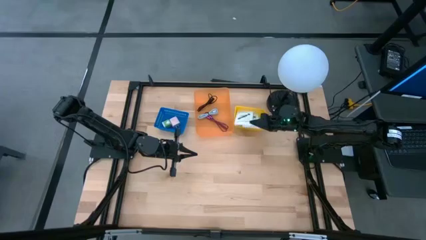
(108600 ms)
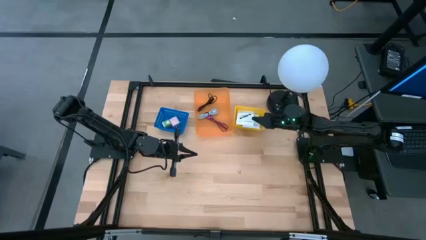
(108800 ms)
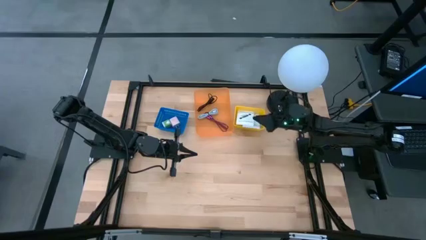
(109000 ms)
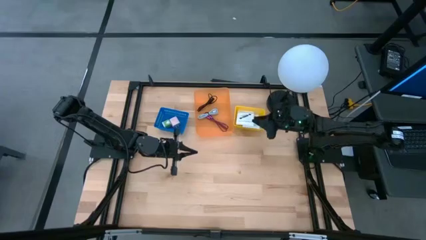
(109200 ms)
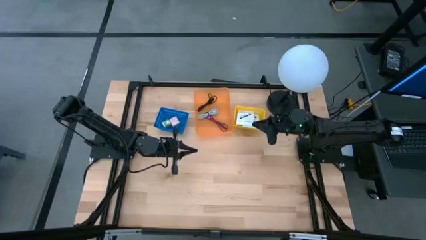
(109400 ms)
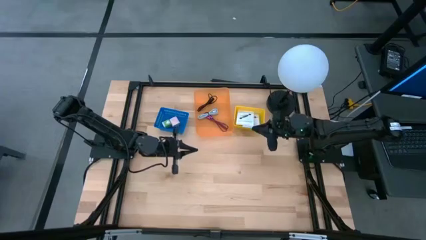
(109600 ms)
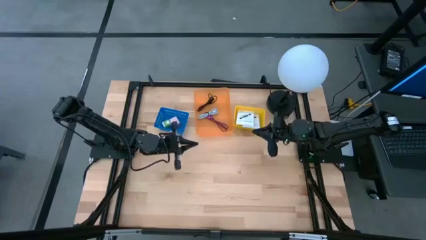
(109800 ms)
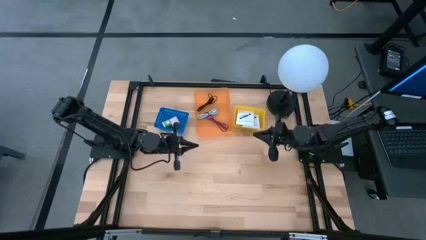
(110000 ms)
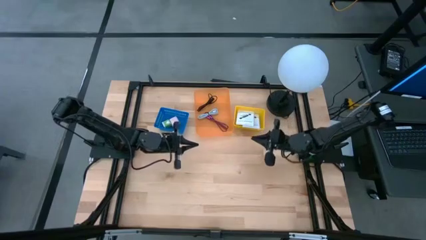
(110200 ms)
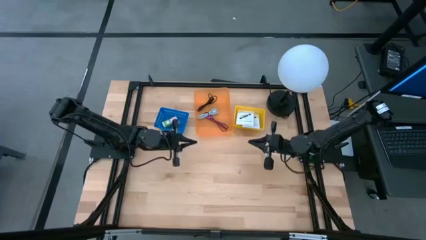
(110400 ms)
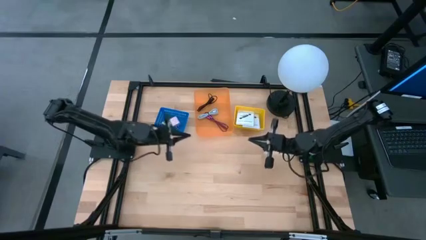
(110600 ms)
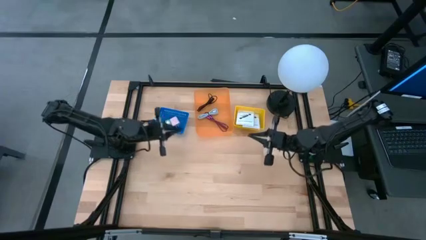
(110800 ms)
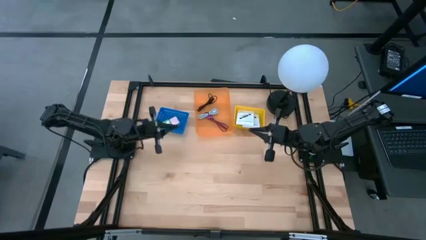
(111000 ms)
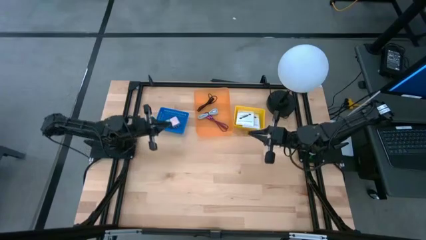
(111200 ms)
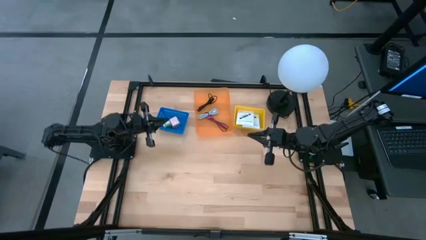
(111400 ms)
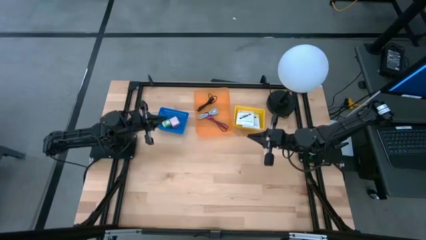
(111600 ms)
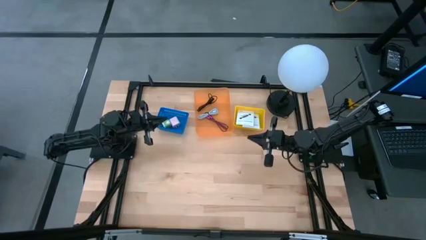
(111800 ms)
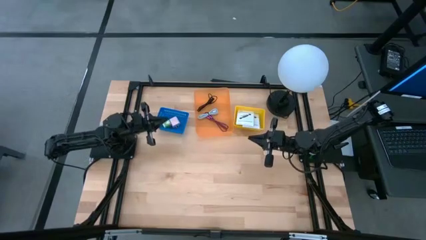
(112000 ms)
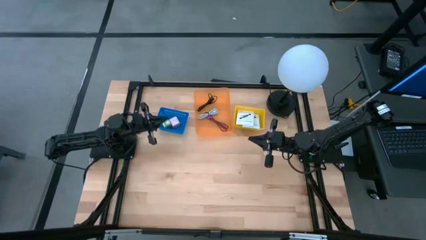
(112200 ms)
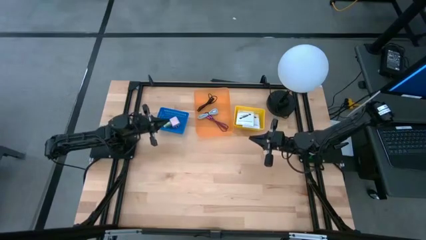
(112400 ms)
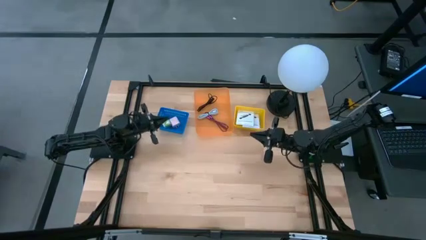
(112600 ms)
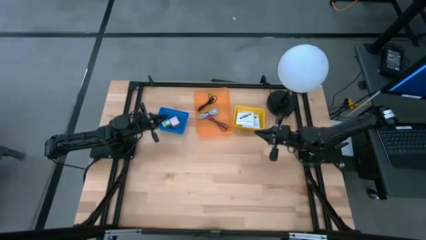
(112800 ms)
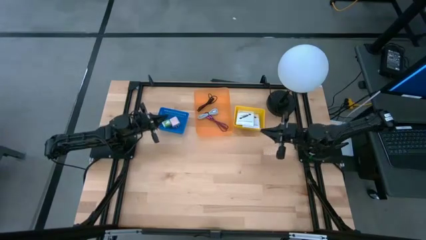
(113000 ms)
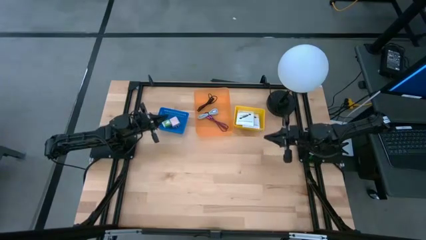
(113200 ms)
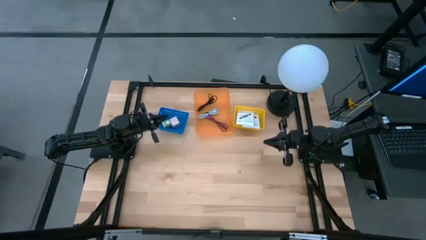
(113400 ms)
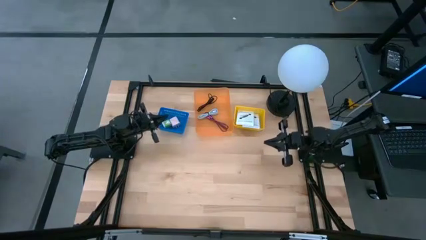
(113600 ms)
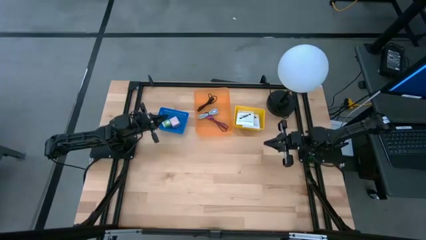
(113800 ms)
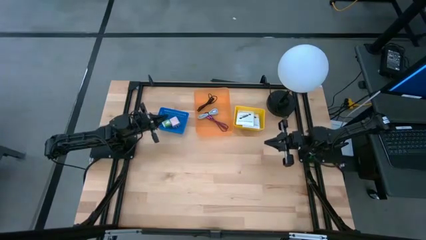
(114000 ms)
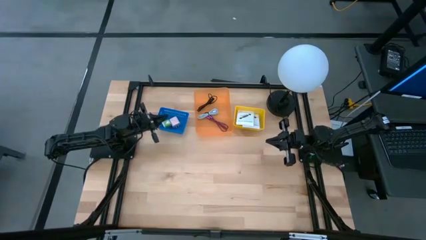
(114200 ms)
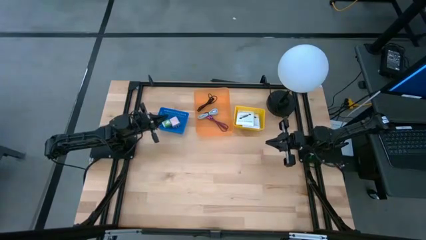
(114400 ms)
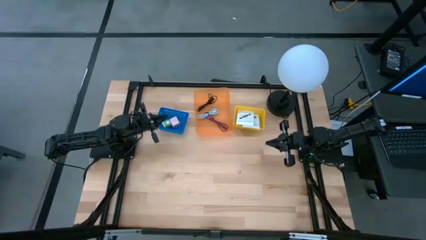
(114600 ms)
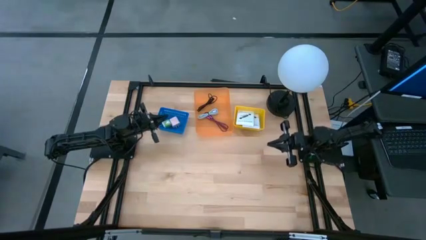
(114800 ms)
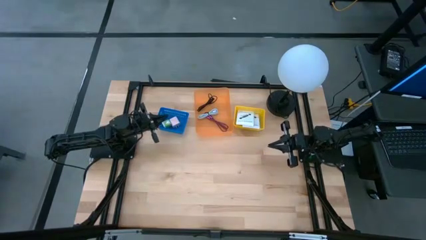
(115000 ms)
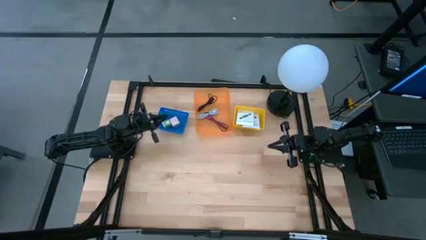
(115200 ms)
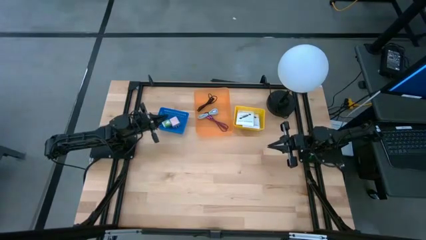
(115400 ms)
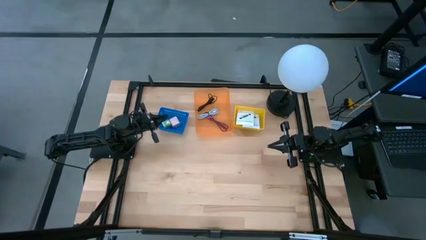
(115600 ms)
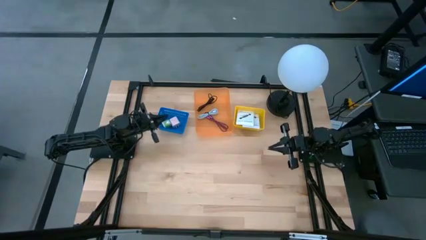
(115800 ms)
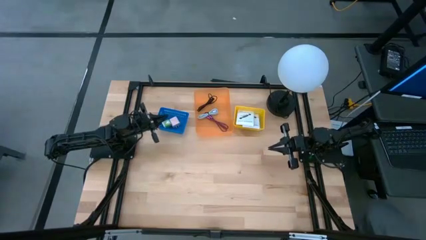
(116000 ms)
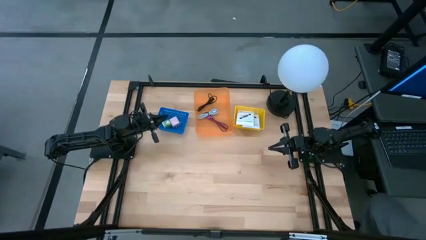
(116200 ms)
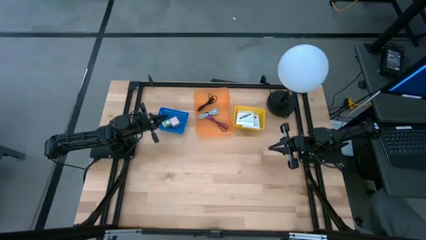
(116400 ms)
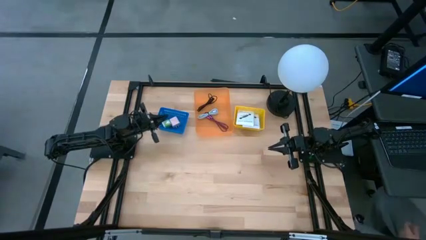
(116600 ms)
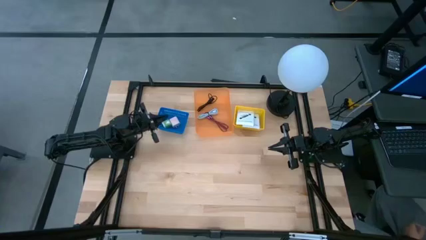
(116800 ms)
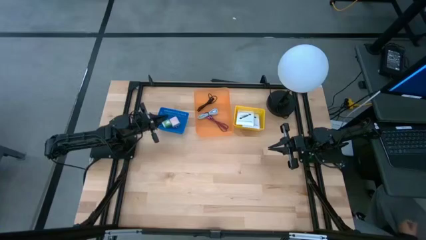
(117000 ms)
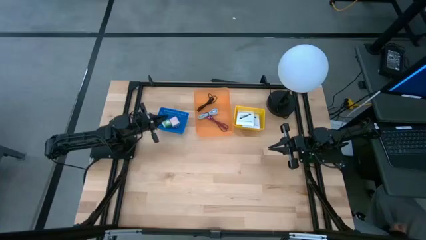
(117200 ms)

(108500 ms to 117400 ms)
Task: Pick and place items into bin
Return to Home Position

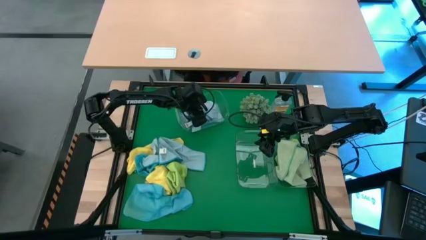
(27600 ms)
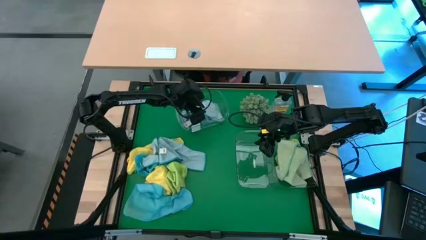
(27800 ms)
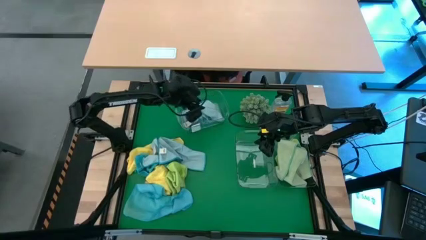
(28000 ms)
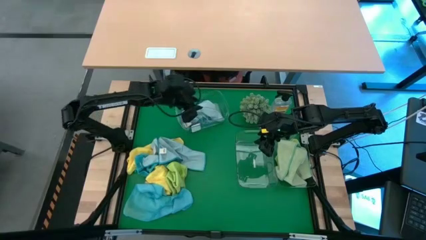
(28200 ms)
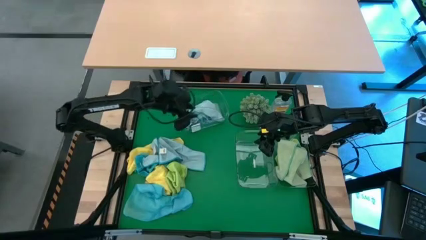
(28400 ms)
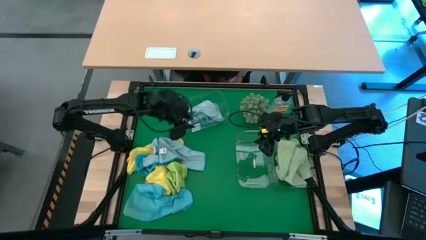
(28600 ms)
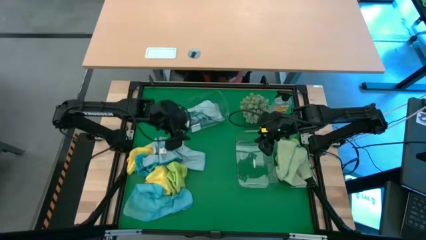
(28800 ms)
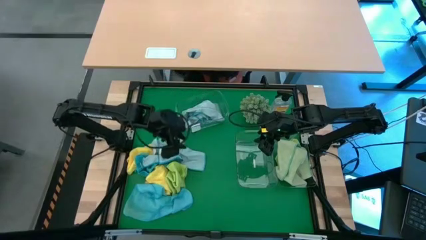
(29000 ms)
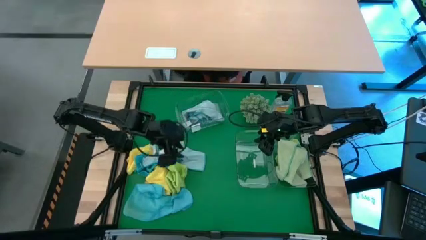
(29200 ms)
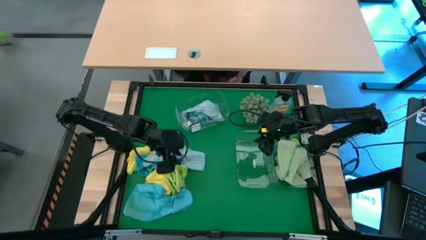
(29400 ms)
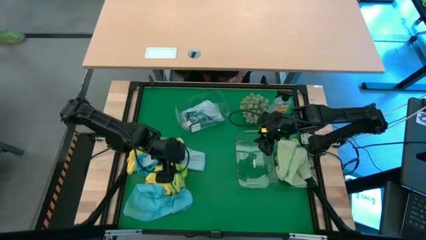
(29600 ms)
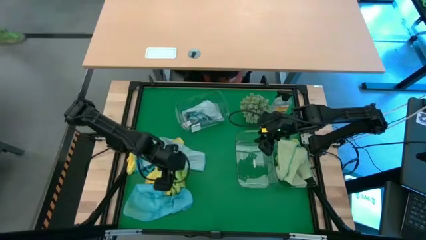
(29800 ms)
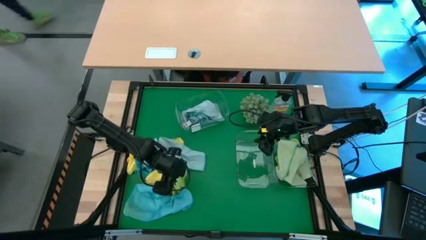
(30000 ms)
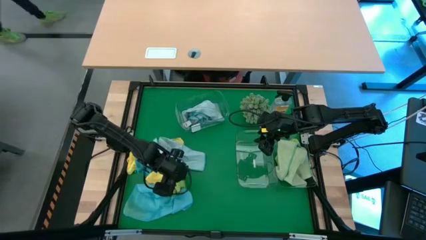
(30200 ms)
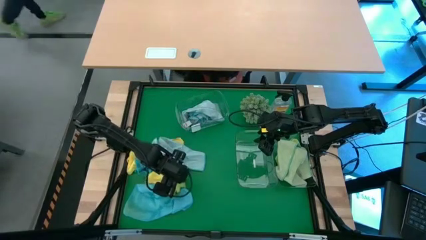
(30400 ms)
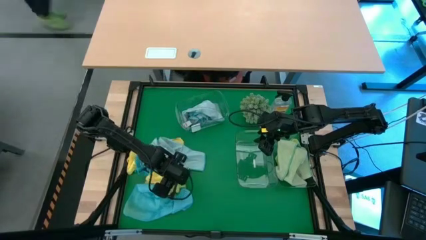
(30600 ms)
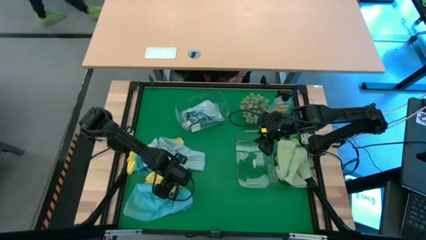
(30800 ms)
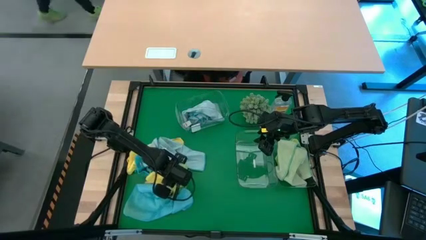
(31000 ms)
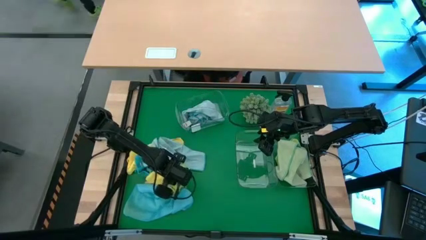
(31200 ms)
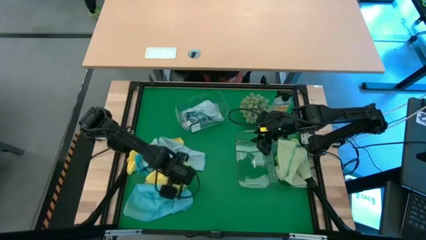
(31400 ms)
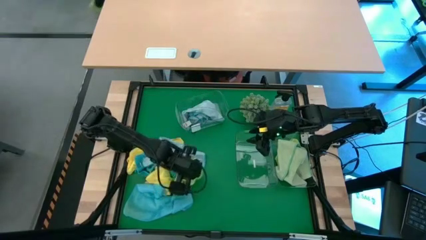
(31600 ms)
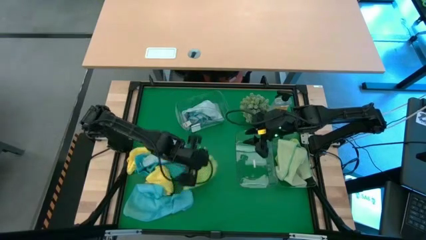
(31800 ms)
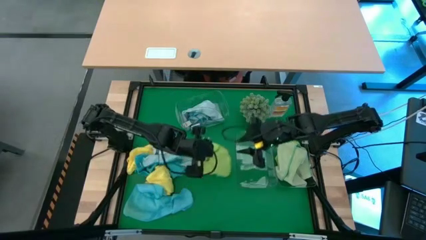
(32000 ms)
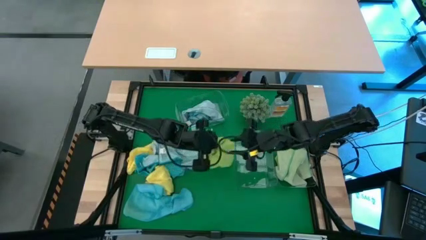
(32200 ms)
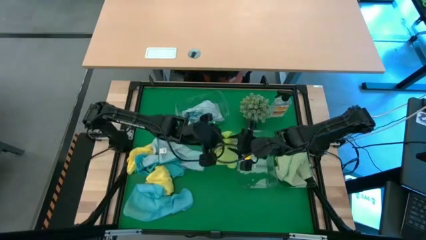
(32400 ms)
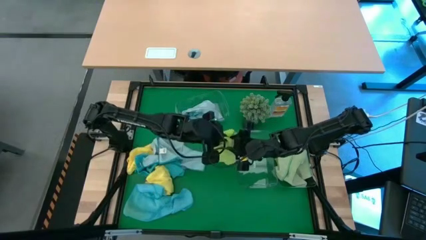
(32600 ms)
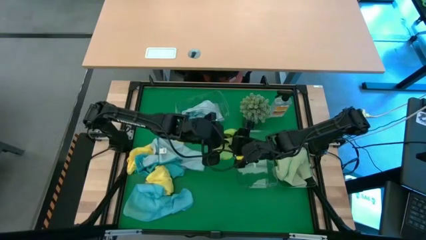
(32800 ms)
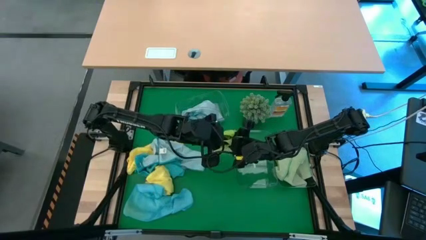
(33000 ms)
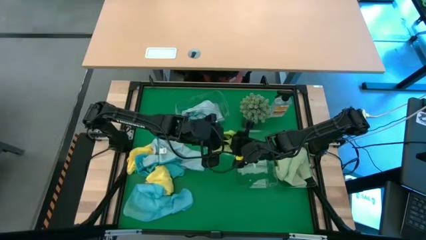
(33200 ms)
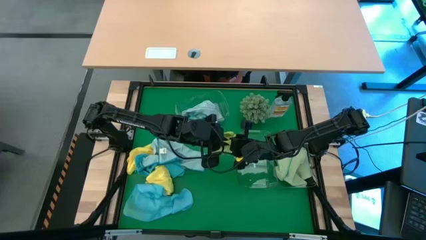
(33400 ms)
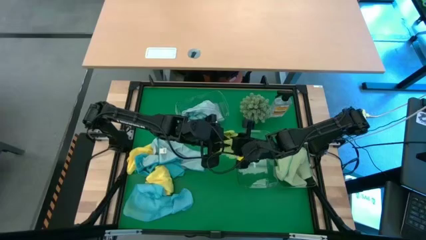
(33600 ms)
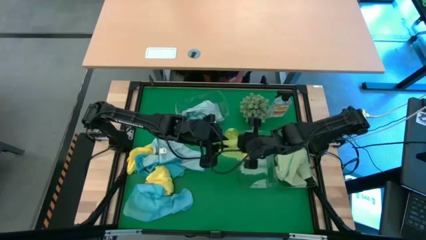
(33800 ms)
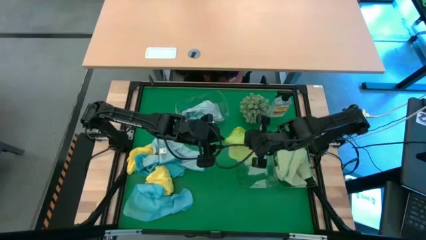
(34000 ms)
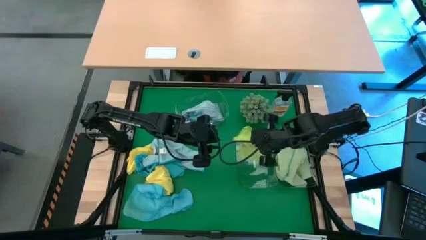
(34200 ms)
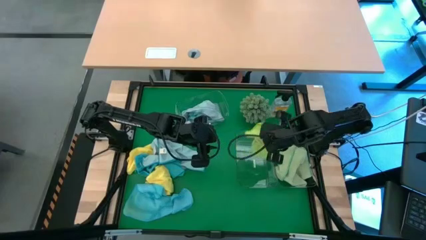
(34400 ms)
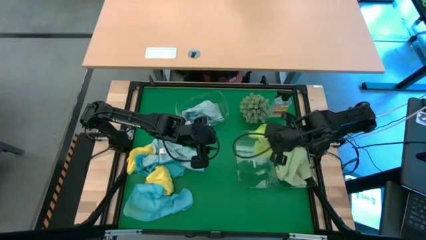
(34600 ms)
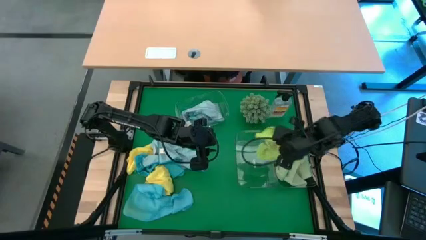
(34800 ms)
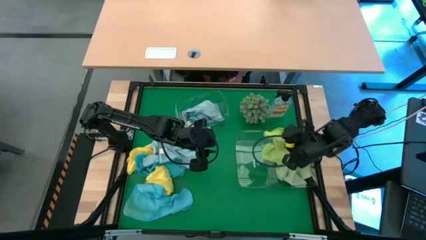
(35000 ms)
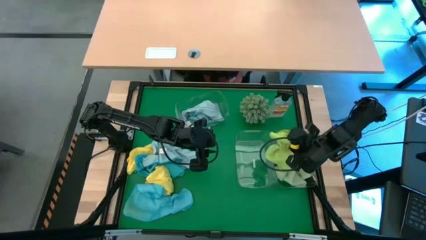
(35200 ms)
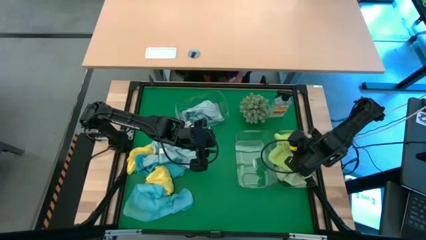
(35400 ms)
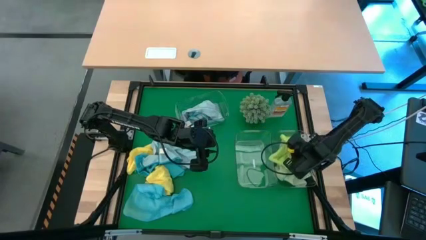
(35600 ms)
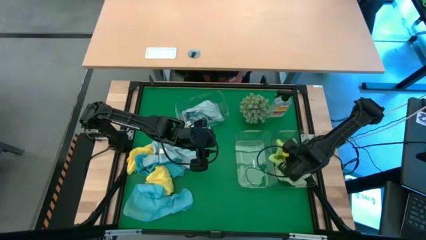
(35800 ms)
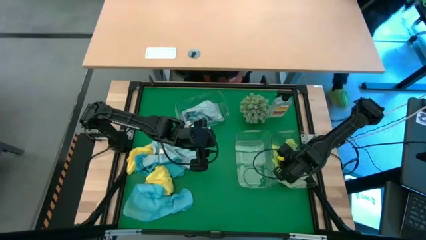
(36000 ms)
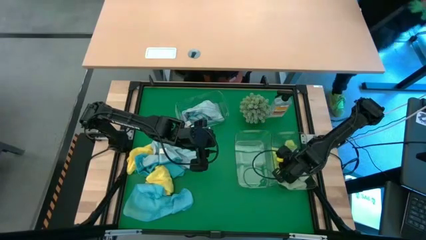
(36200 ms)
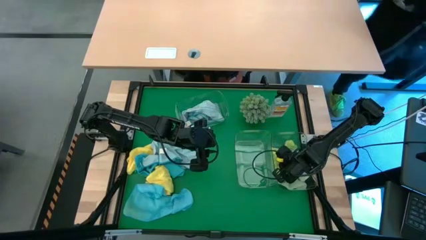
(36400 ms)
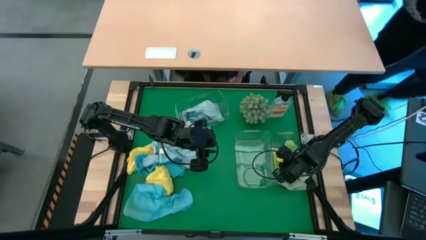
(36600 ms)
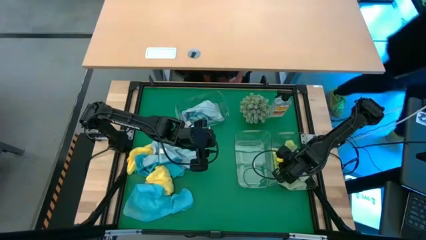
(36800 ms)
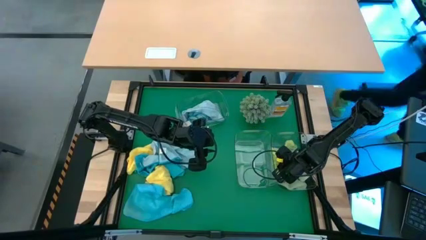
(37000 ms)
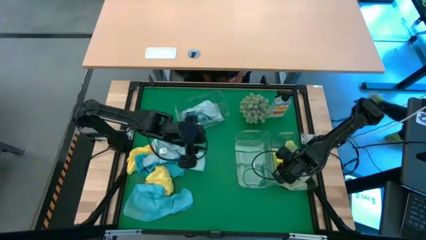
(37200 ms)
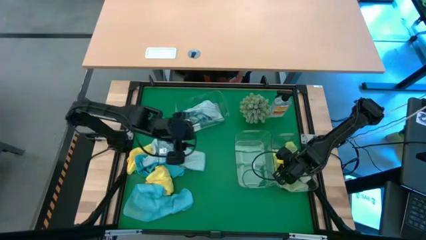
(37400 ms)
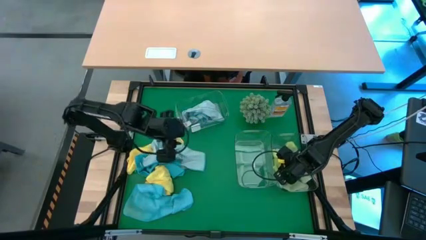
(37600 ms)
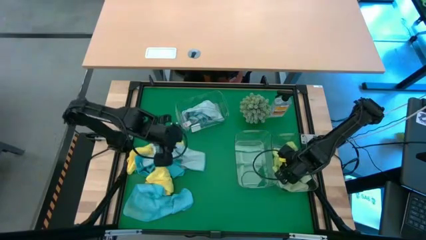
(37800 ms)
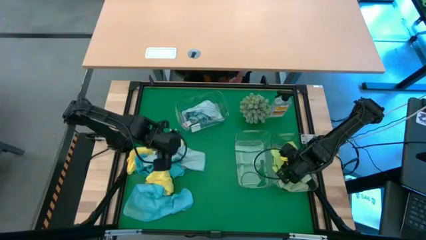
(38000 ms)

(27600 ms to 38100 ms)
Task: Sort microfiber towel by color & place in baskets
Put the green towel into the bottom right transparent bin
